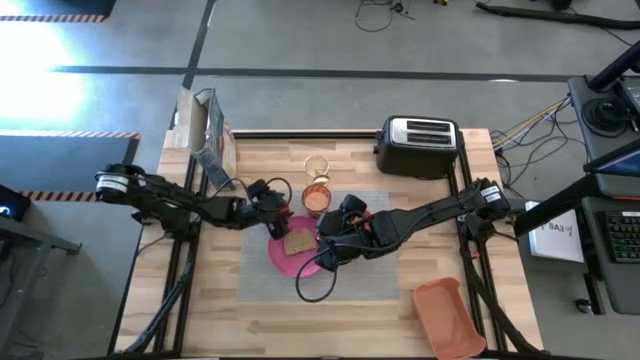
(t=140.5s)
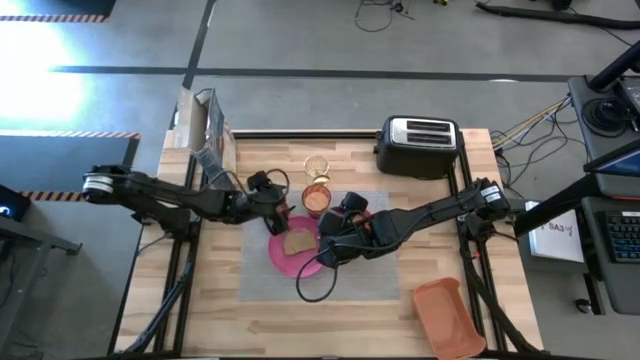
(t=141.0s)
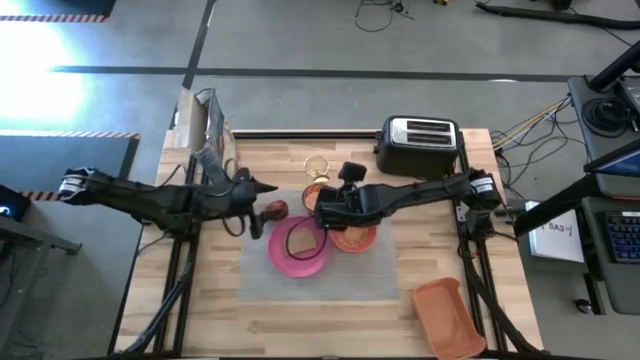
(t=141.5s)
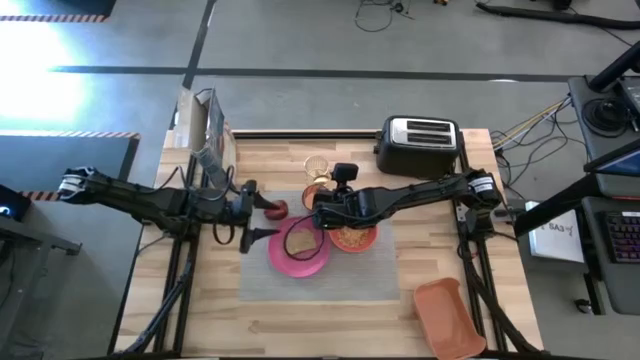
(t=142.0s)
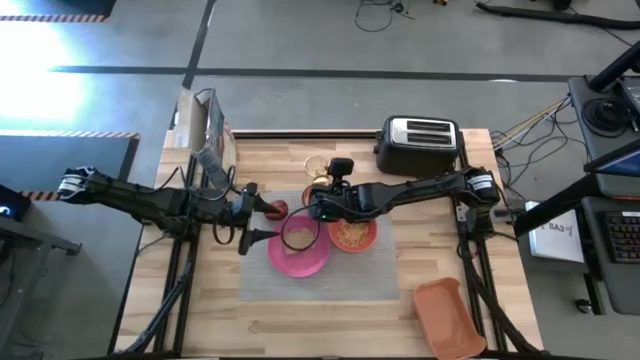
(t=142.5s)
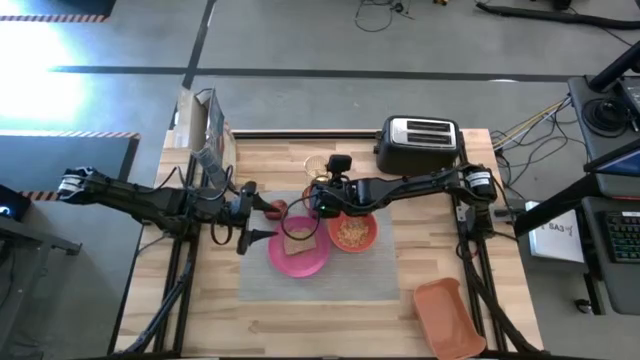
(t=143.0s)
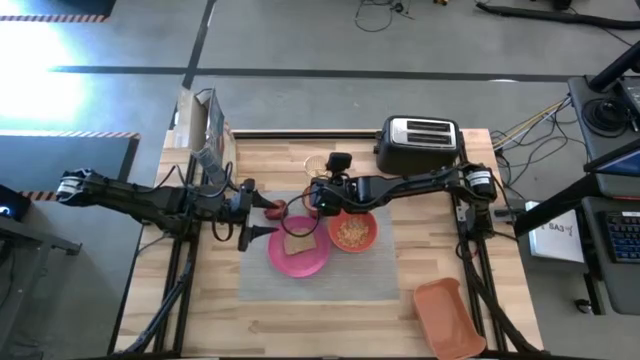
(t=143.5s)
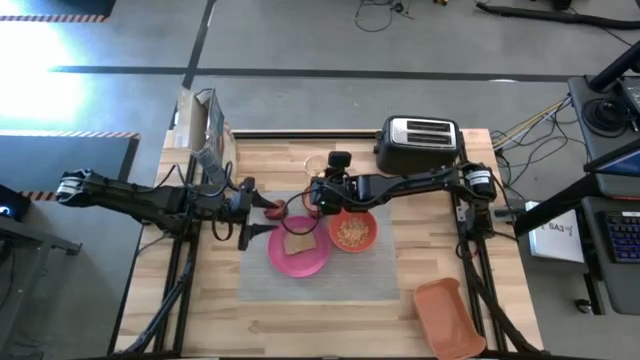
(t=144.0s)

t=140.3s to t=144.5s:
Task: Arrange a breakfast setting
Put the gold spoon to the right of the orange bowl on the table mat

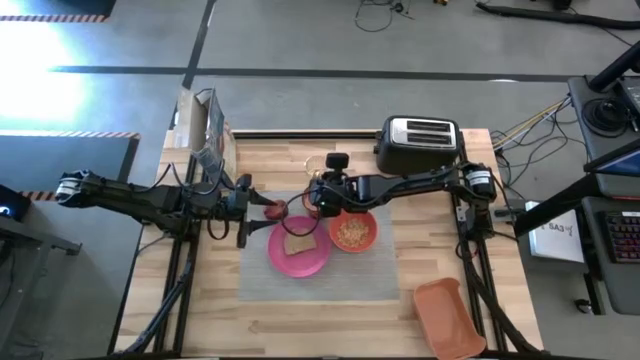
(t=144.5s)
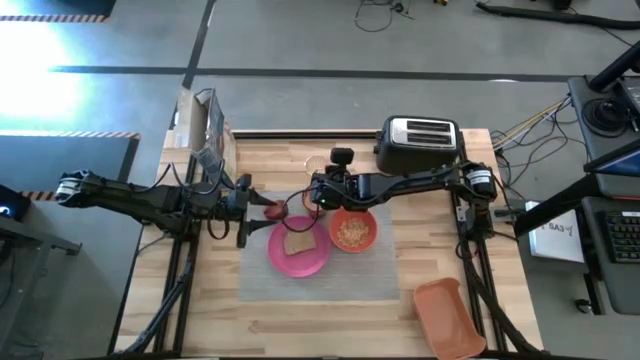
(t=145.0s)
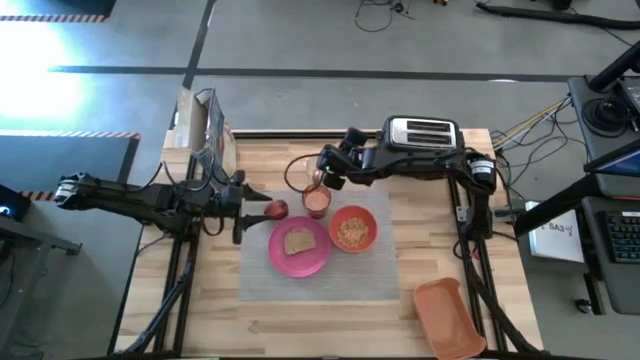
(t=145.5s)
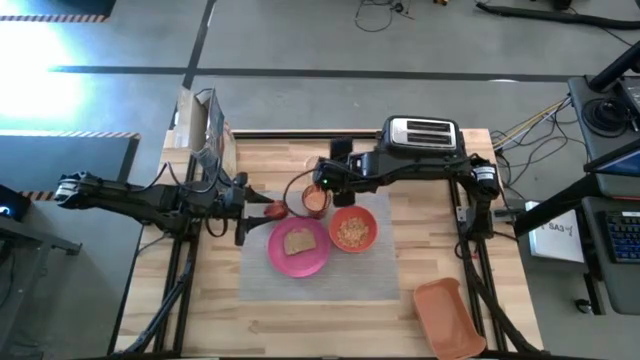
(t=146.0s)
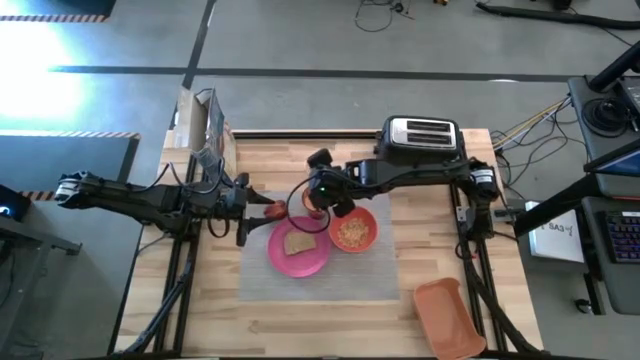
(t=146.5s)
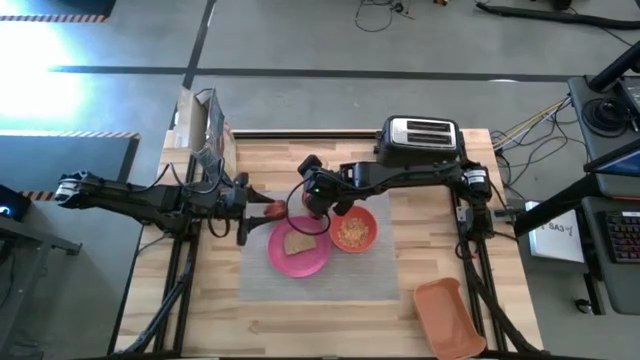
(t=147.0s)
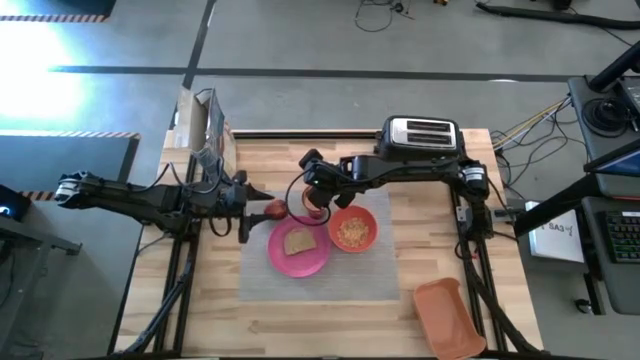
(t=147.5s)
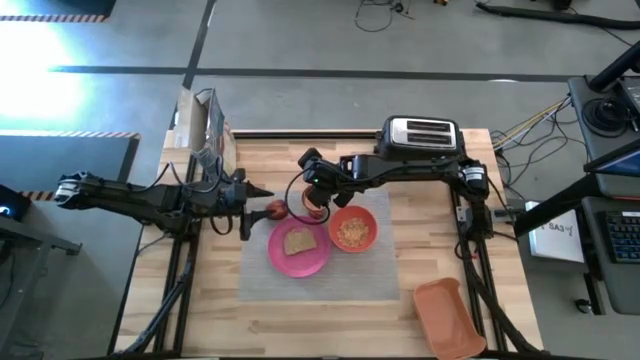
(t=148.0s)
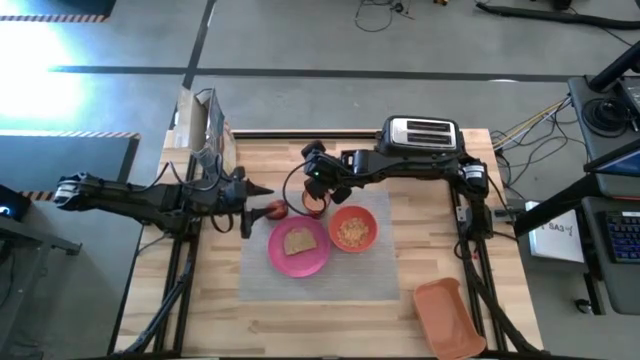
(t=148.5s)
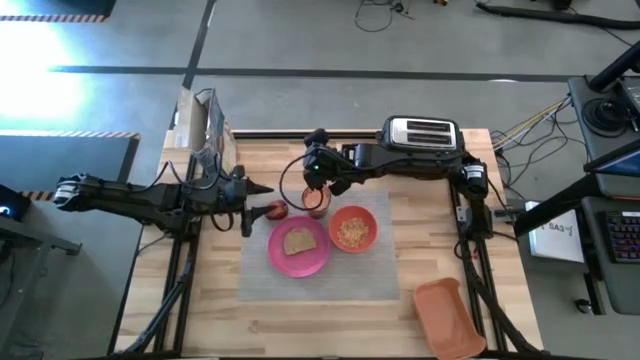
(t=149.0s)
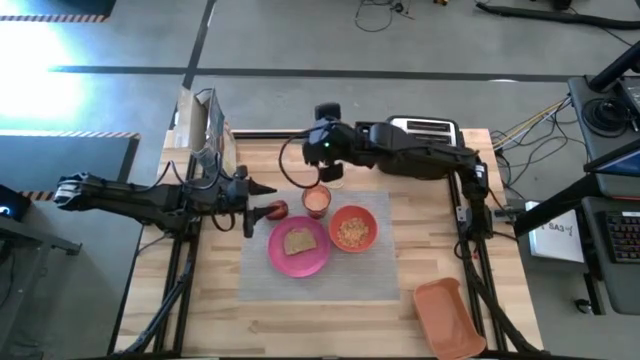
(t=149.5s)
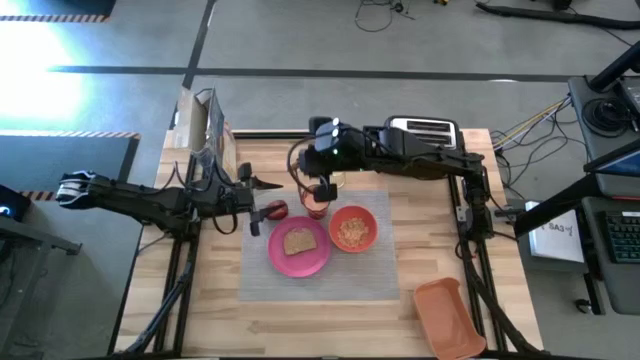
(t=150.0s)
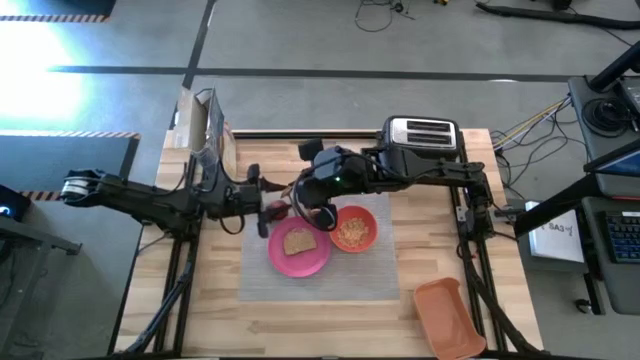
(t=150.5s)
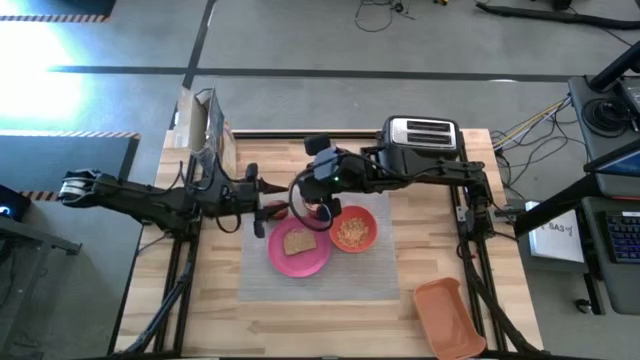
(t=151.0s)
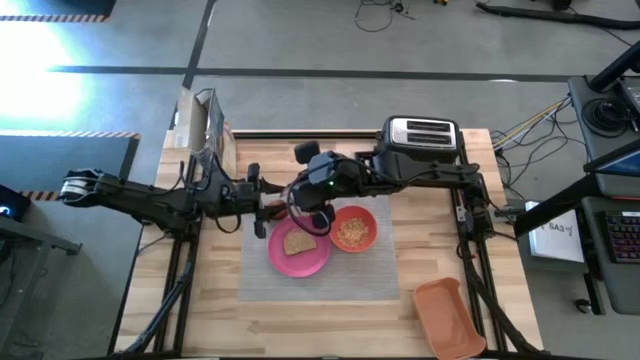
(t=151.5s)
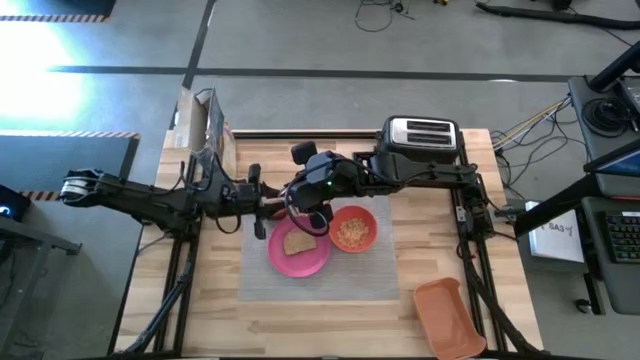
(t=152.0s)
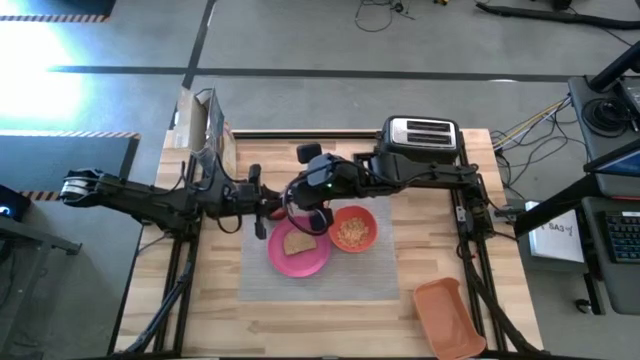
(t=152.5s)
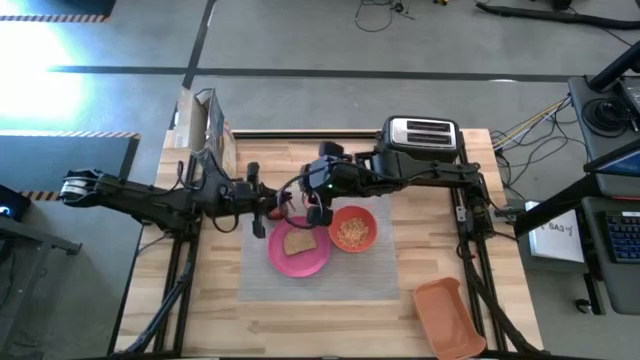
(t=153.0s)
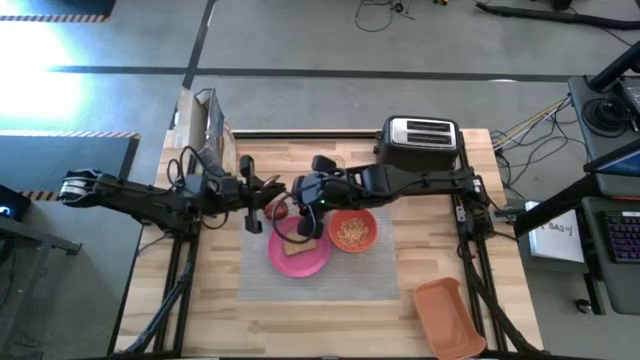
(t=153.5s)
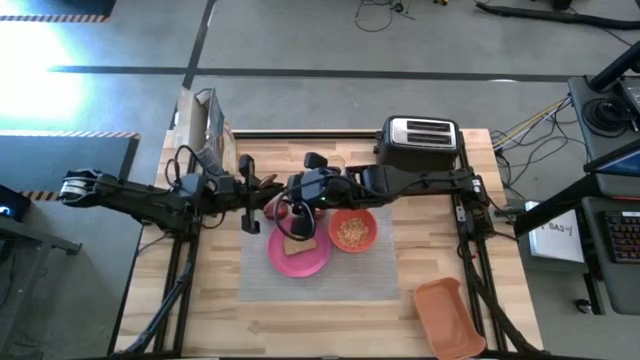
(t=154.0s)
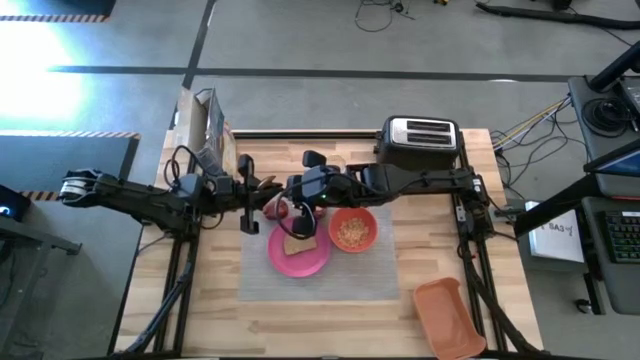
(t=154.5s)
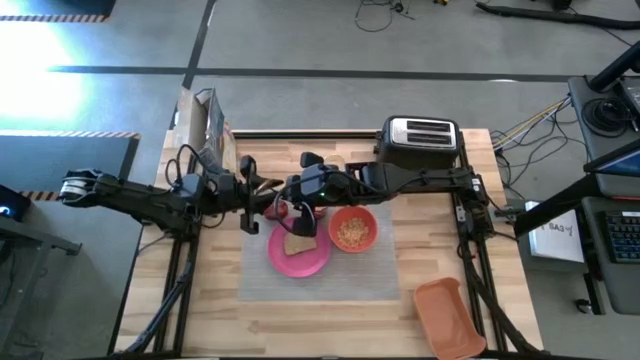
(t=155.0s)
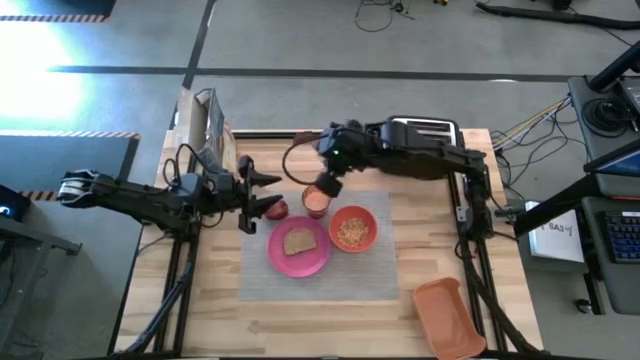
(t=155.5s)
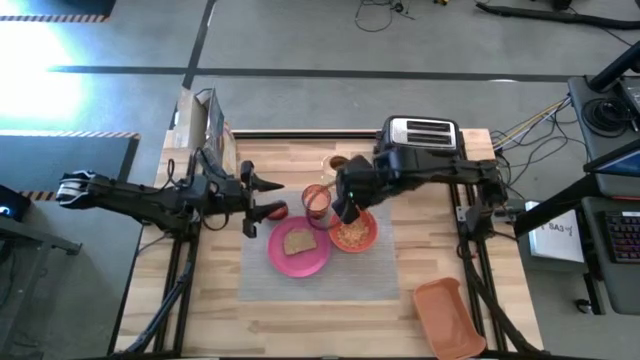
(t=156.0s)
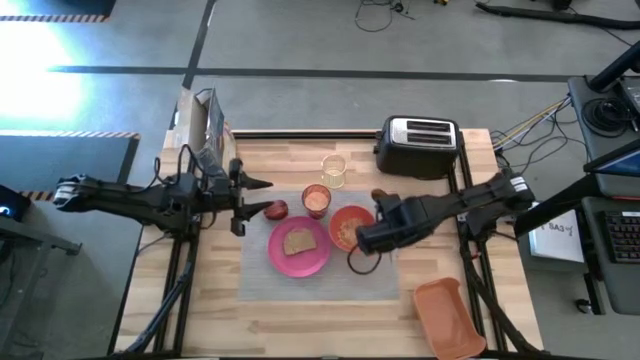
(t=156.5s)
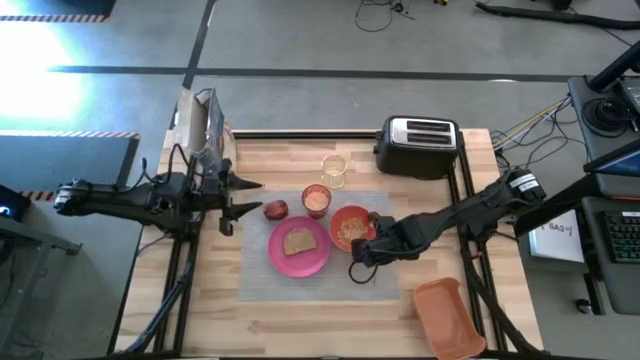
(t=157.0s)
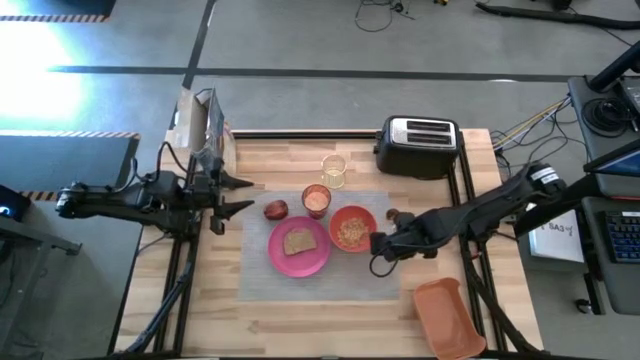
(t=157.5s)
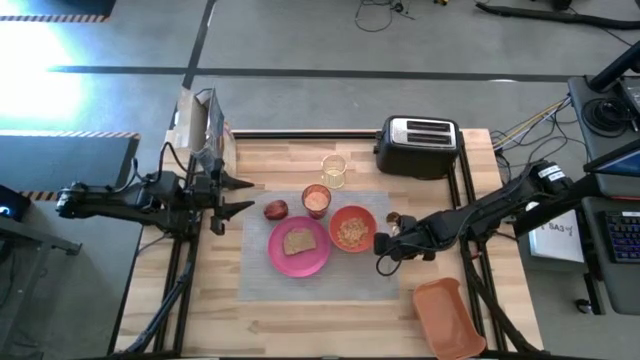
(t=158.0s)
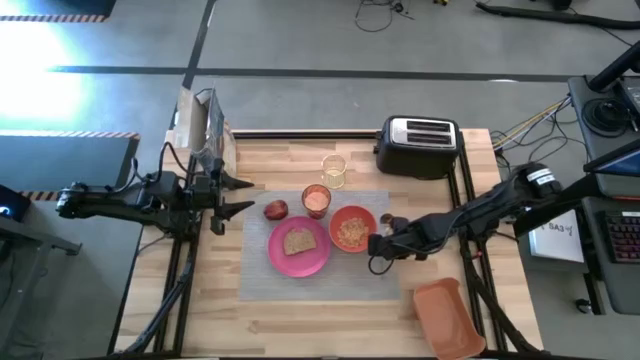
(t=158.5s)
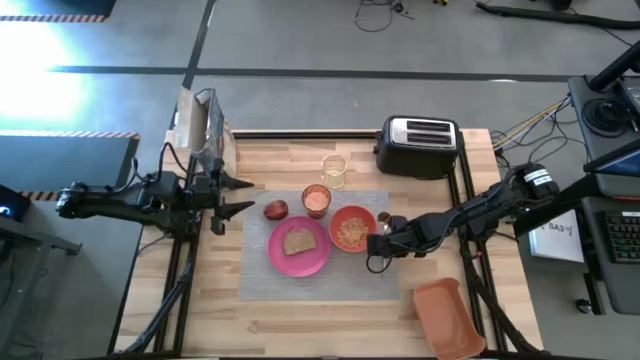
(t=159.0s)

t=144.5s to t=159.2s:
Put the gold spoon to the right of the orange bowl on the table mat

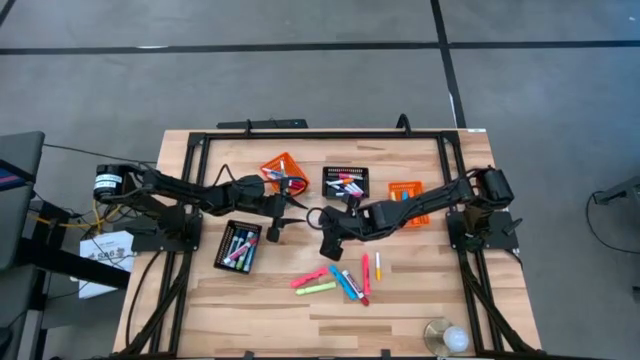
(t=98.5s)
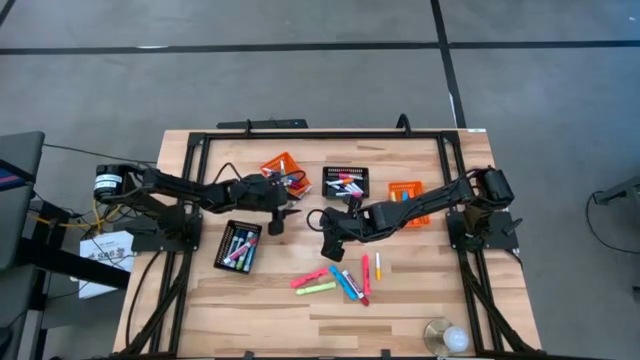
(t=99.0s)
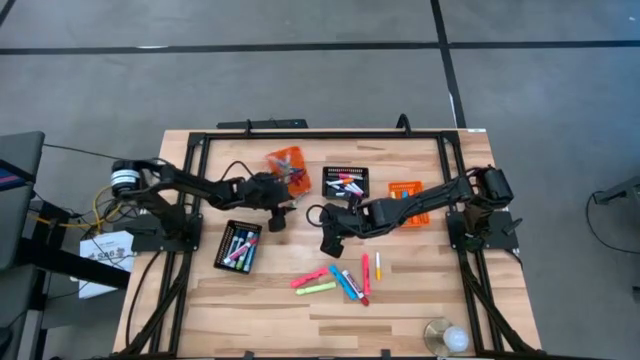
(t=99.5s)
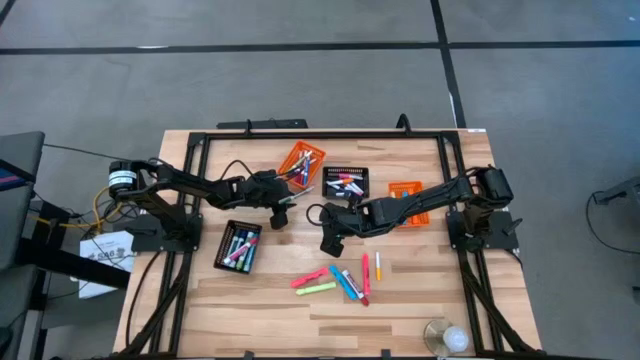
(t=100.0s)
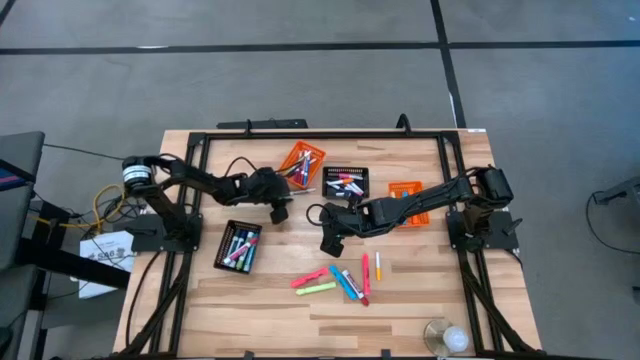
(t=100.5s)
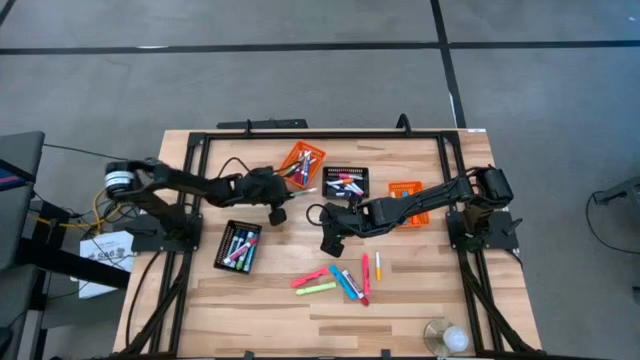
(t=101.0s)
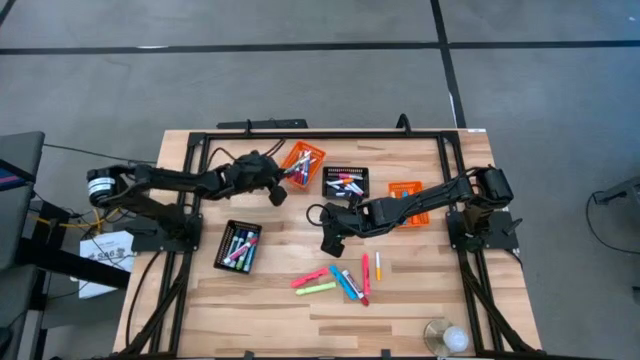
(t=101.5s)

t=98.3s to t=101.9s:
Task: Pick & Place Markers
Put the green marker into the left orange bin
